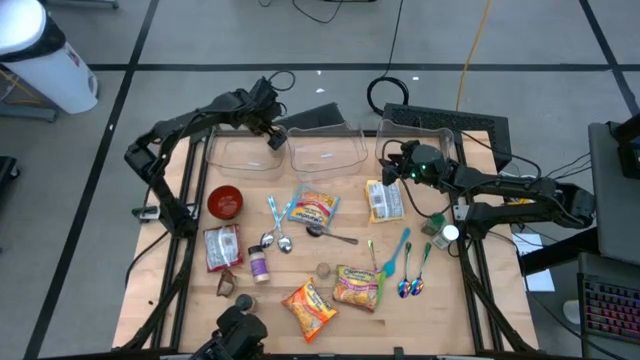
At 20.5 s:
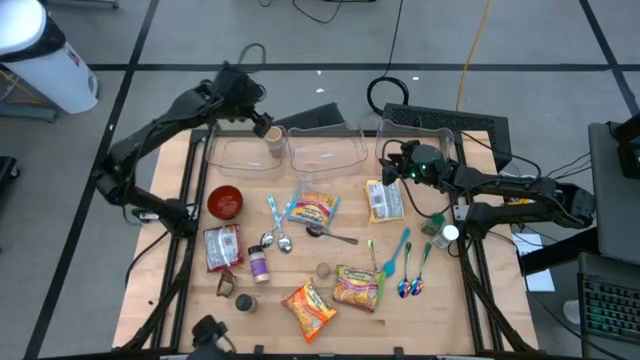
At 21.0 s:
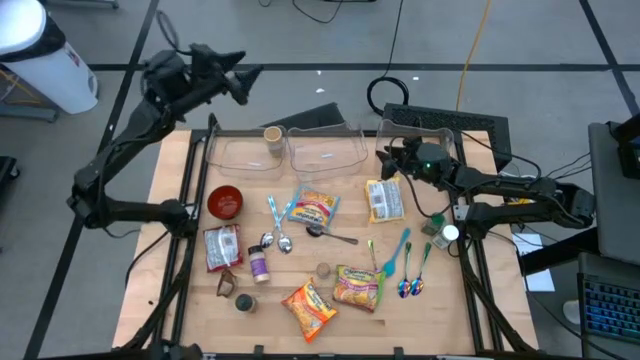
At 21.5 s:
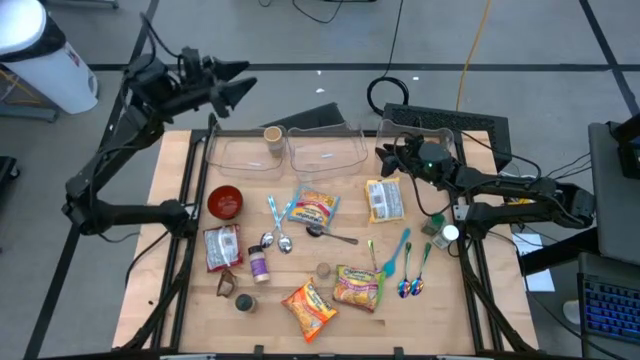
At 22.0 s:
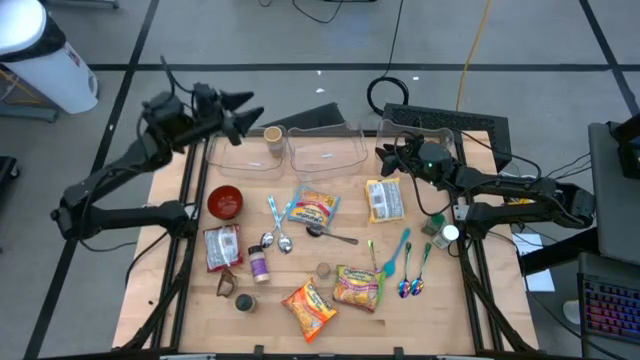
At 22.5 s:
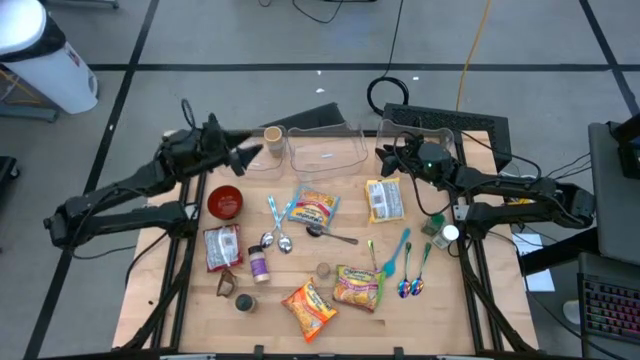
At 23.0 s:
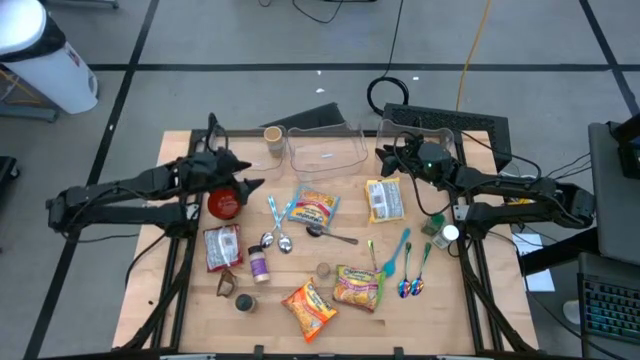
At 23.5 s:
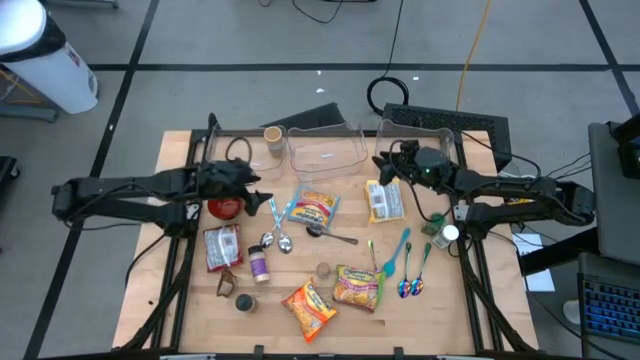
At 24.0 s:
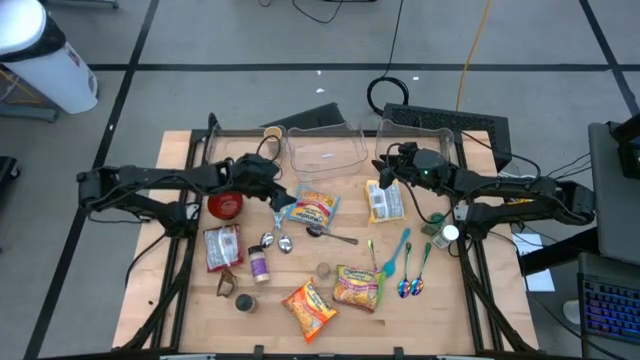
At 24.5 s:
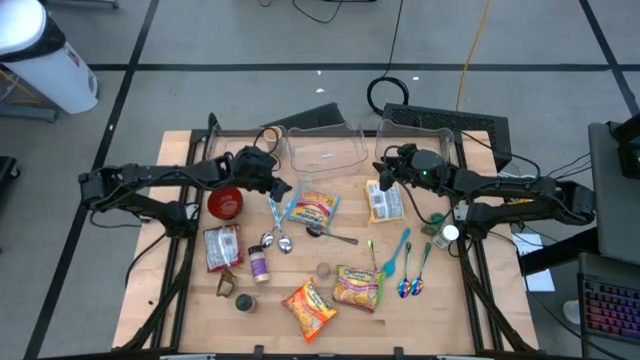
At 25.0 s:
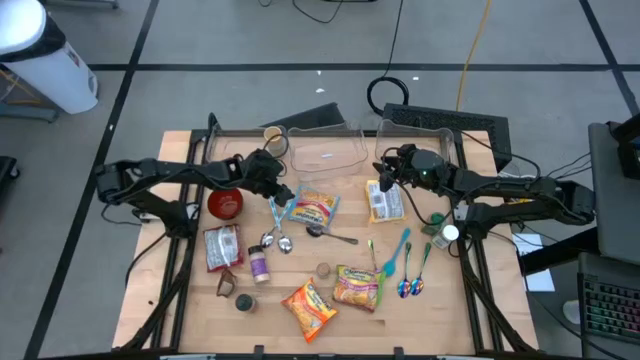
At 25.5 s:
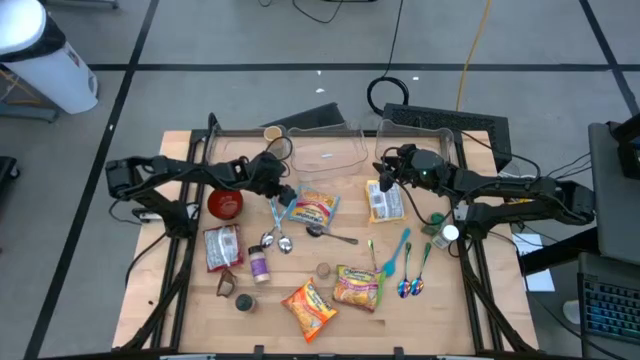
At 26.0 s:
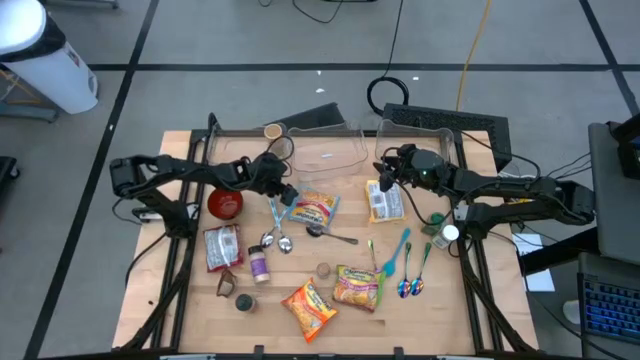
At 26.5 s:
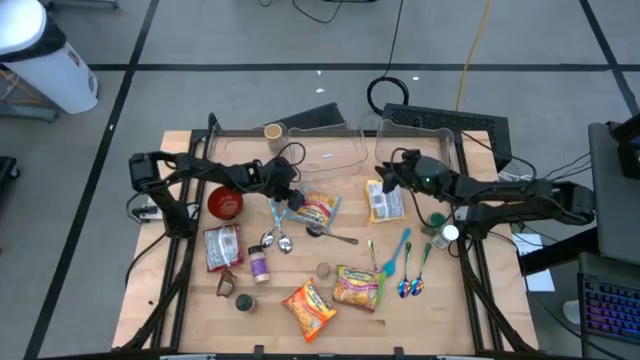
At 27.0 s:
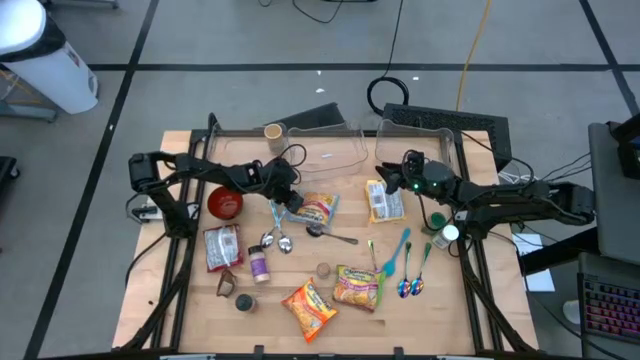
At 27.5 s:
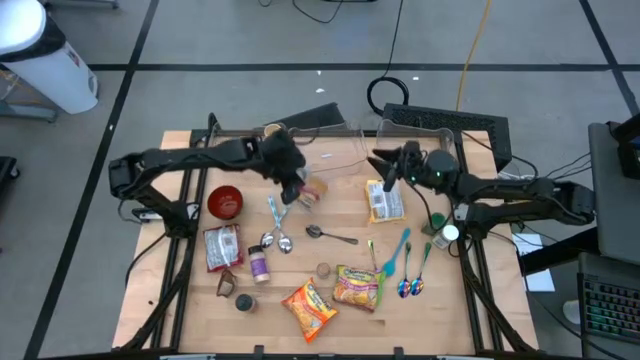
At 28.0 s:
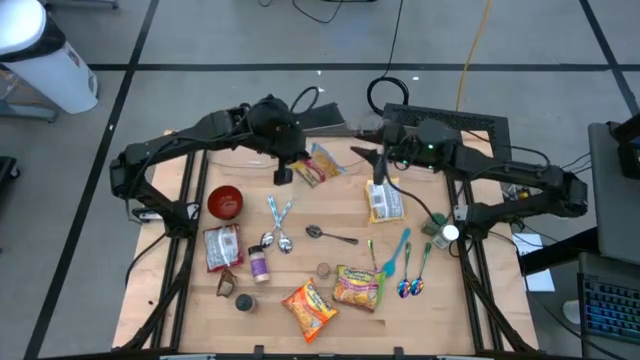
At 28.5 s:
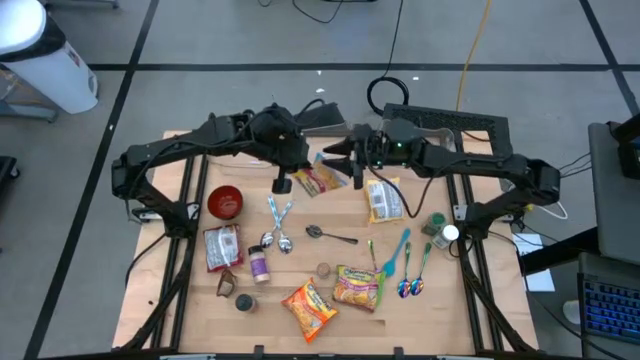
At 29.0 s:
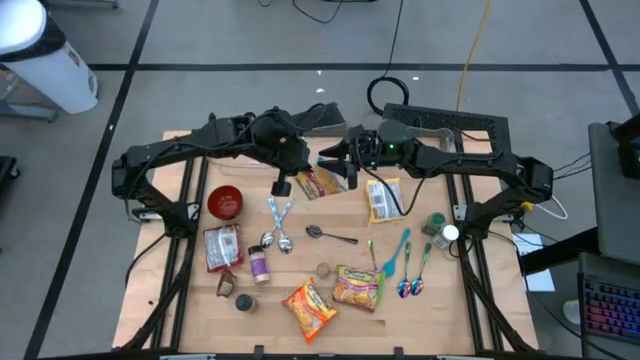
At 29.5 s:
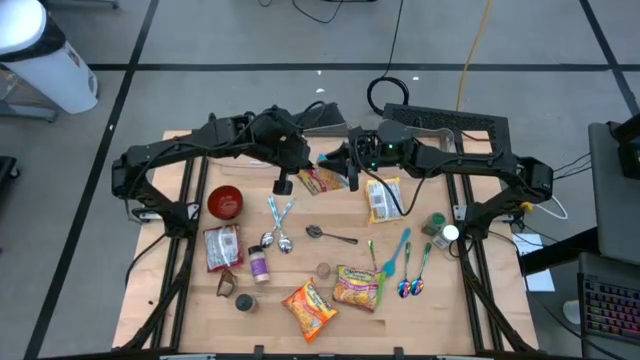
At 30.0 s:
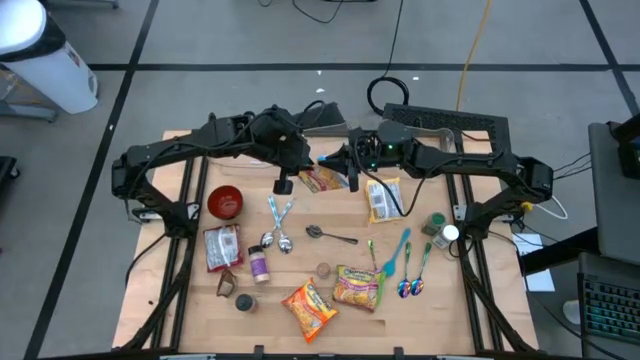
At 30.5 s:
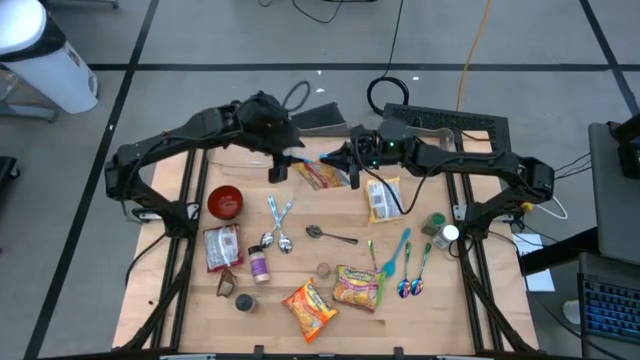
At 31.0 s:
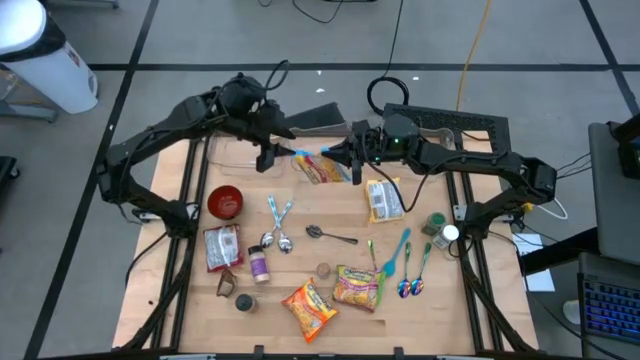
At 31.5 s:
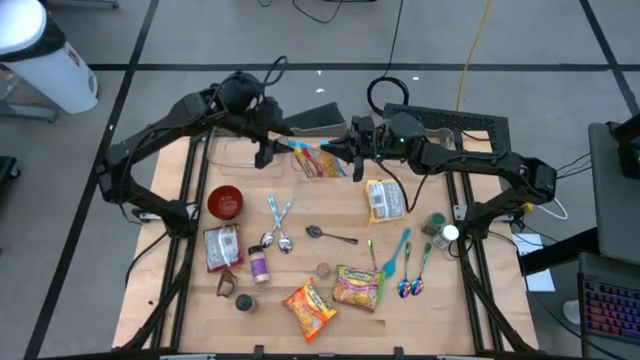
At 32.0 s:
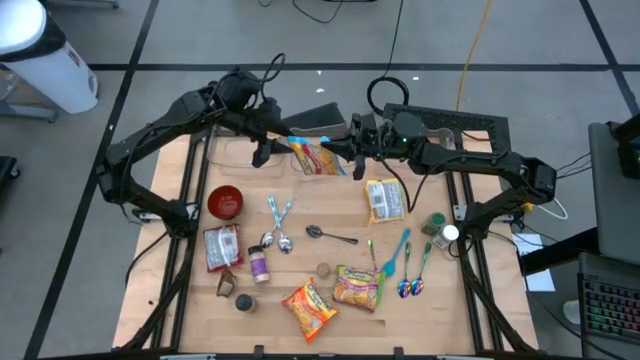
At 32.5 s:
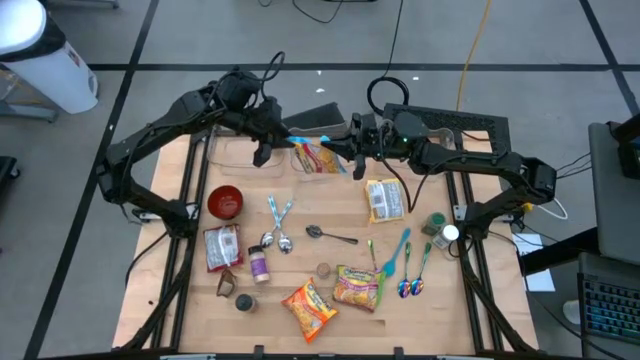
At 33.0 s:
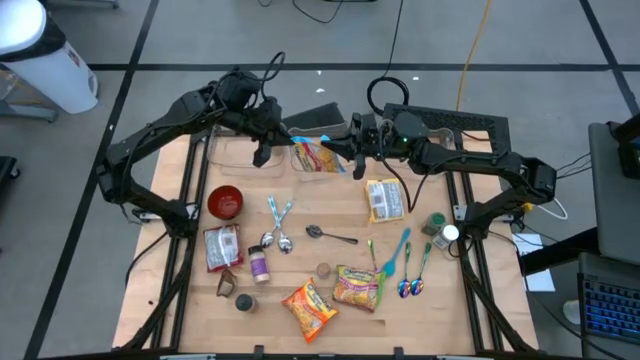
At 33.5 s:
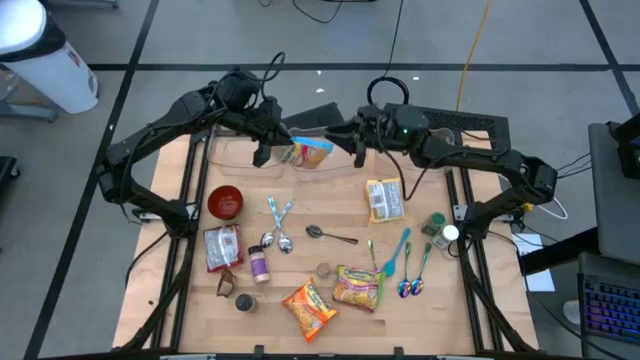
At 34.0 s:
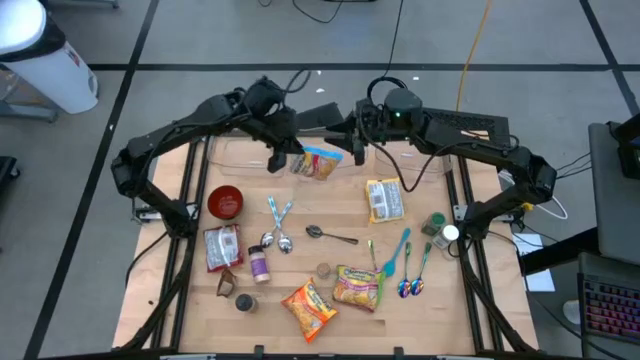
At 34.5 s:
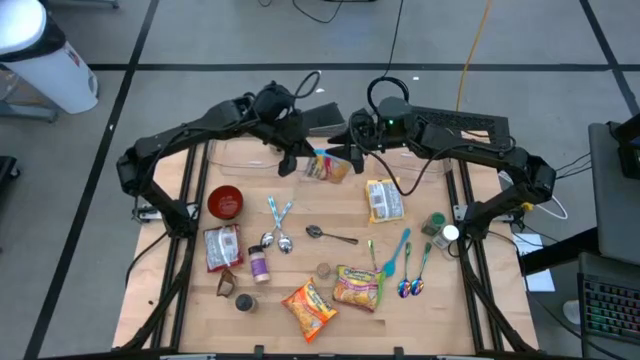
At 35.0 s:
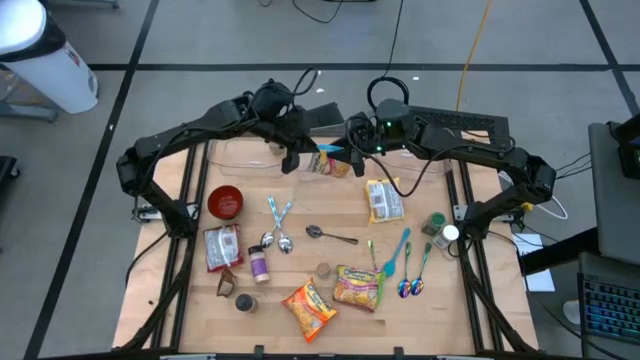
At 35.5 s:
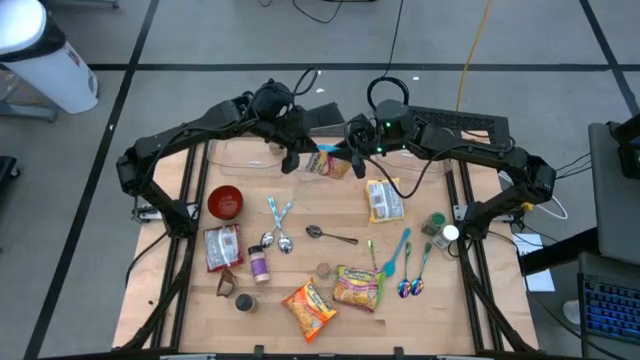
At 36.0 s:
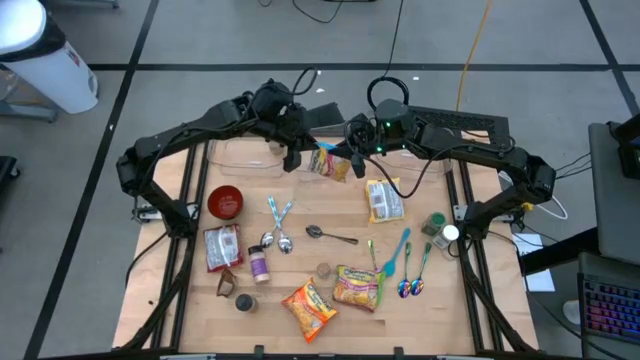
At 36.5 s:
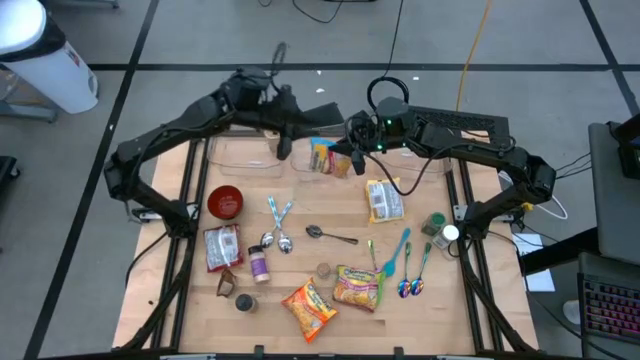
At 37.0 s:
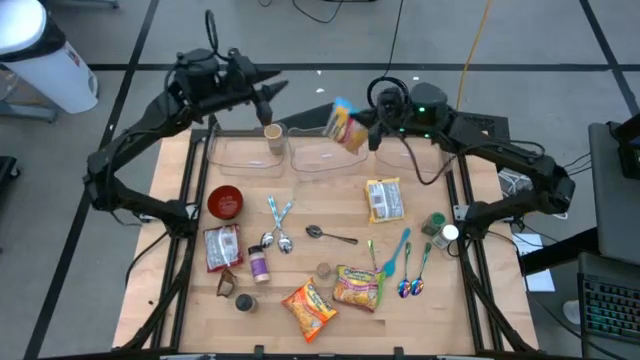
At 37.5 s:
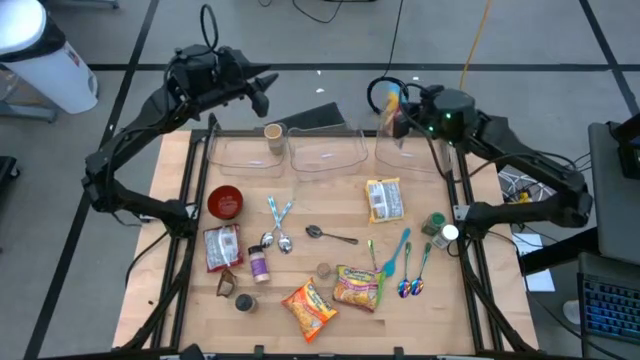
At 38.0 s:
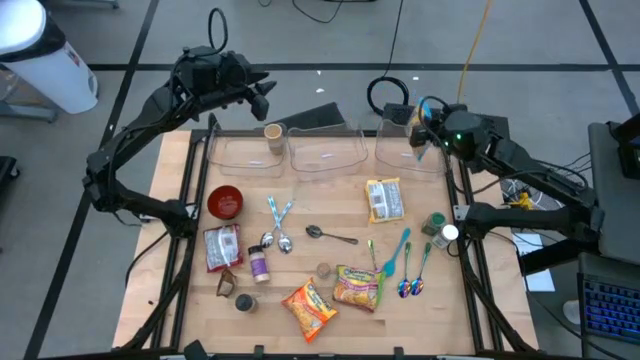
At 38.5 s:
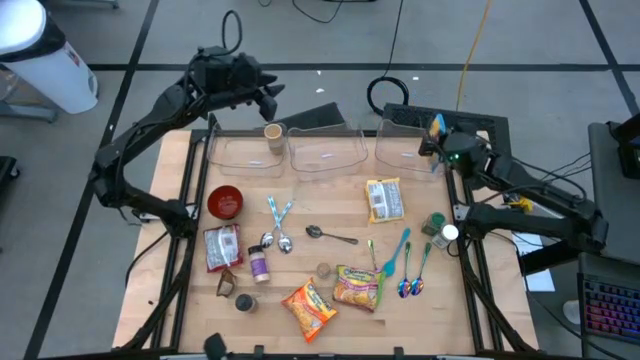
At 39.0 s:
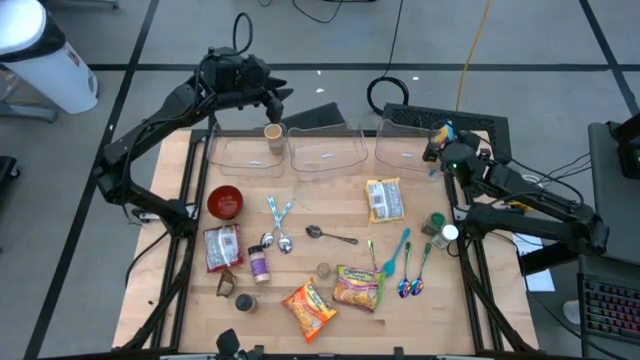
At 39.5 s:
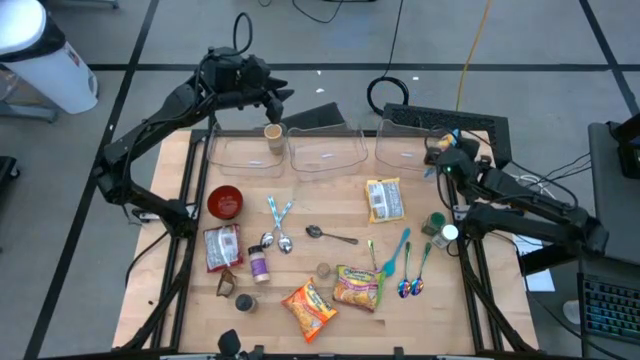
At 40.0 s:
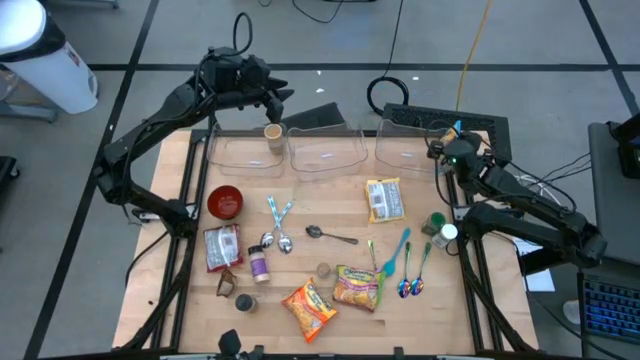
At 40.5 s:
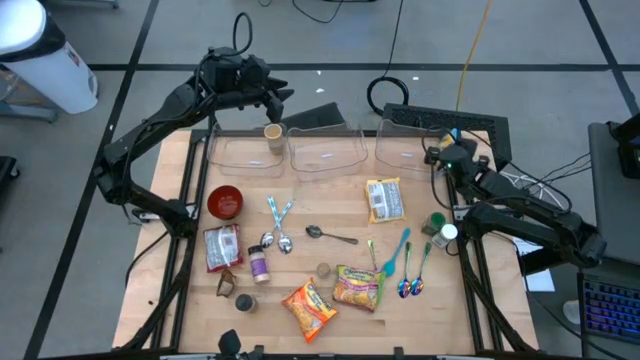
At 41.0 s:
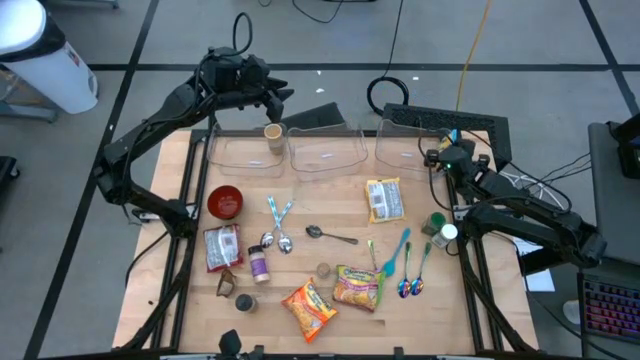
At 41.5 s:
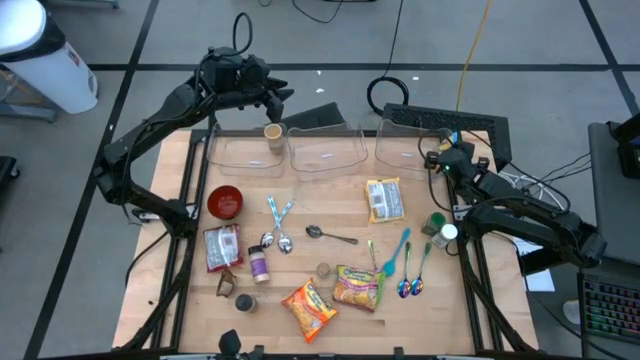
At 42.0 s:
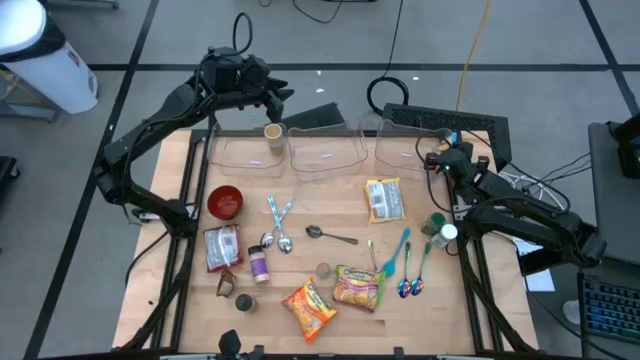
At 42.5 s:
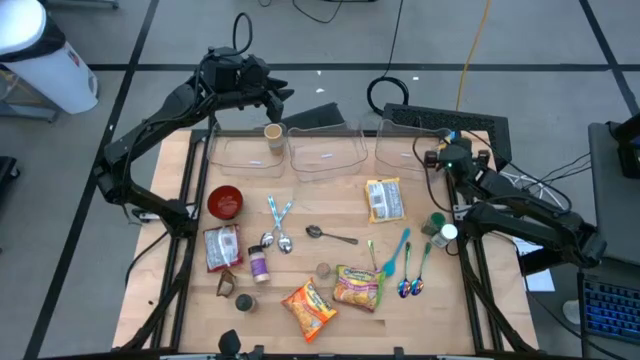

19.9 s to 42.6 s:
Task: Pick & Place Food Item
Put the blue noodle pack into the right transparent bin
